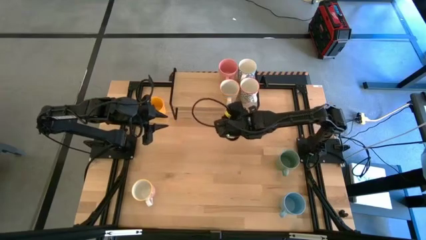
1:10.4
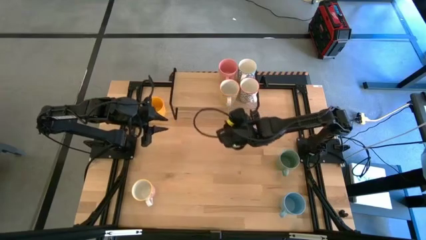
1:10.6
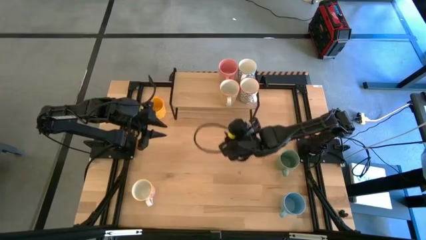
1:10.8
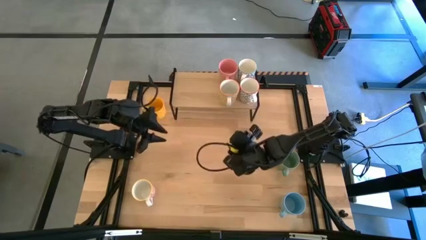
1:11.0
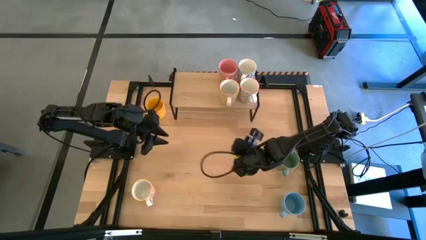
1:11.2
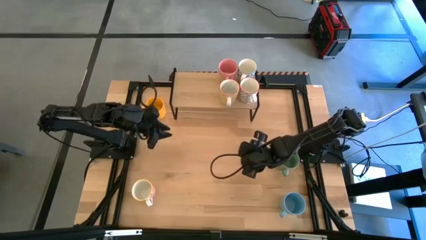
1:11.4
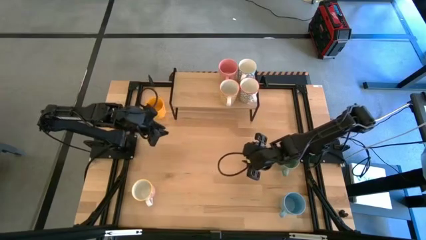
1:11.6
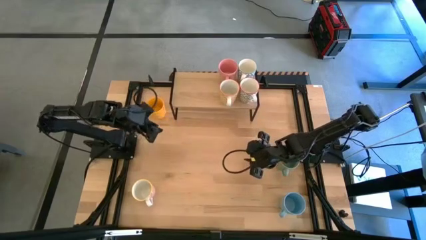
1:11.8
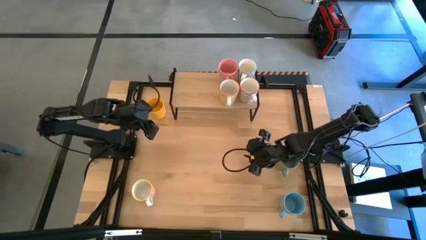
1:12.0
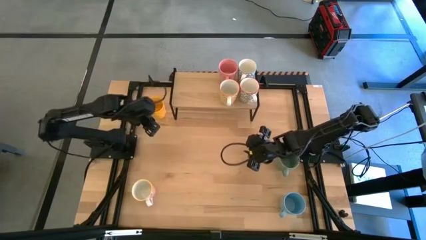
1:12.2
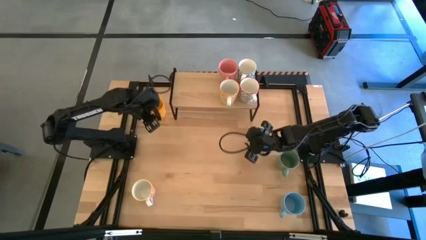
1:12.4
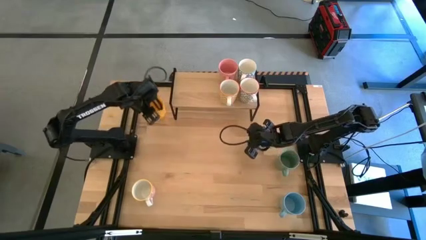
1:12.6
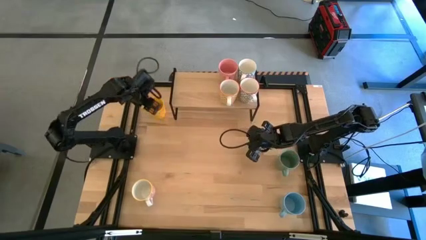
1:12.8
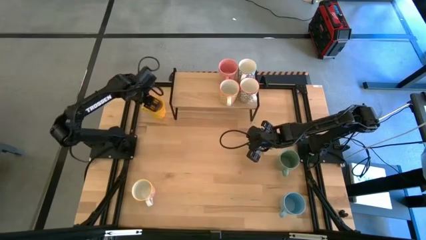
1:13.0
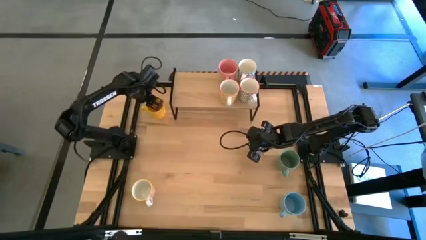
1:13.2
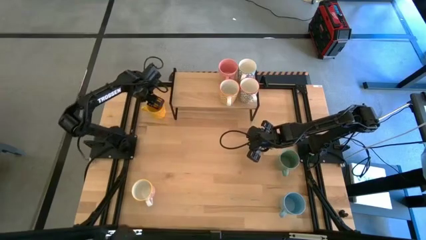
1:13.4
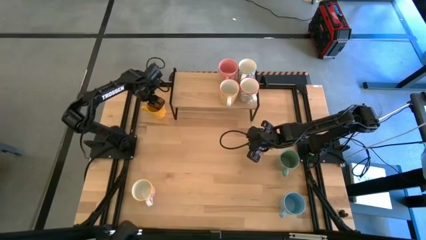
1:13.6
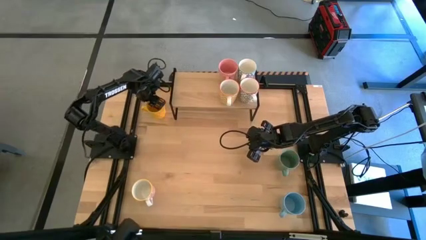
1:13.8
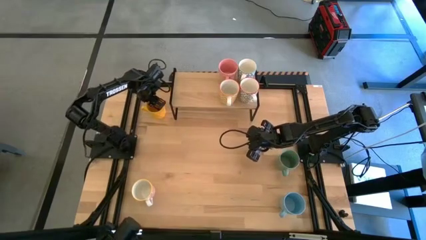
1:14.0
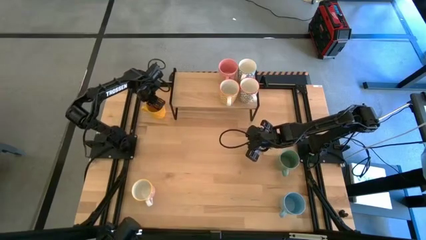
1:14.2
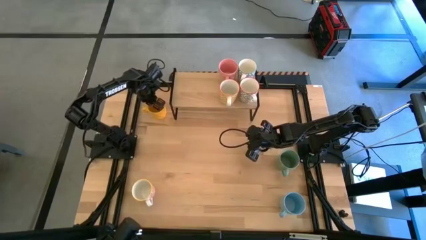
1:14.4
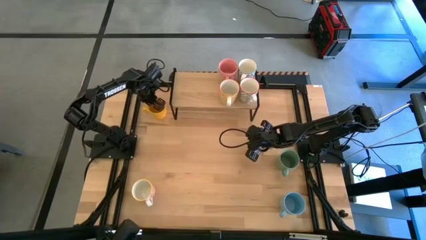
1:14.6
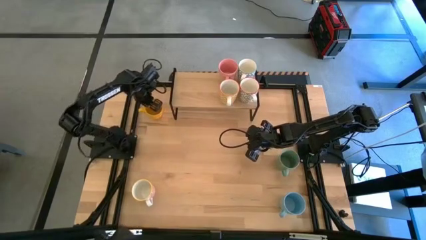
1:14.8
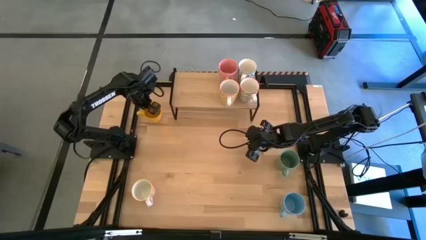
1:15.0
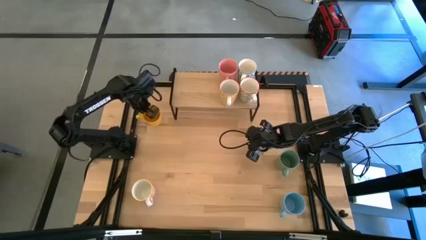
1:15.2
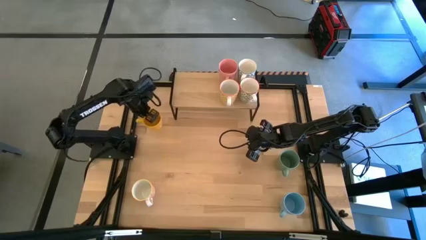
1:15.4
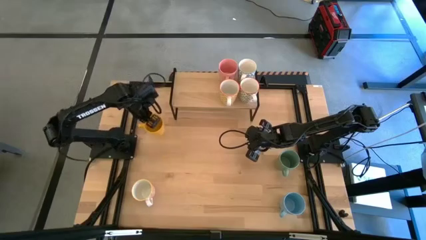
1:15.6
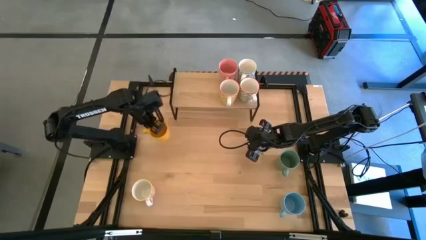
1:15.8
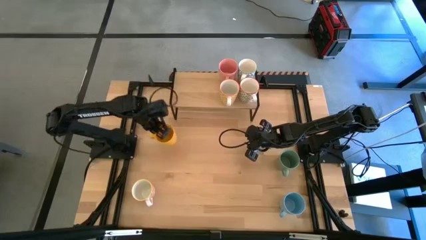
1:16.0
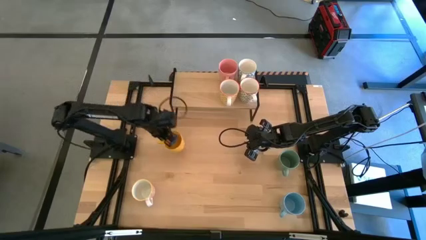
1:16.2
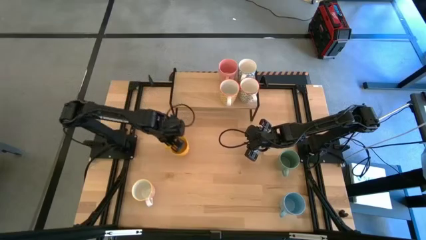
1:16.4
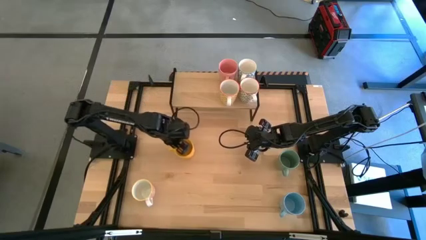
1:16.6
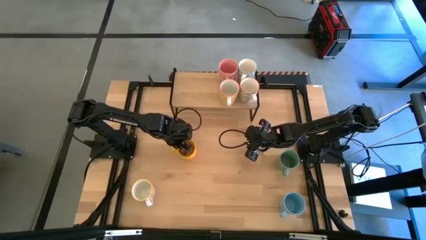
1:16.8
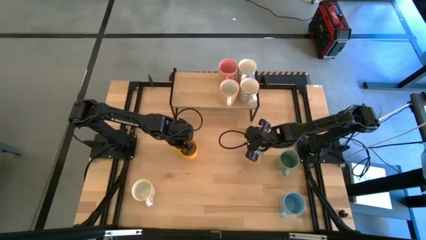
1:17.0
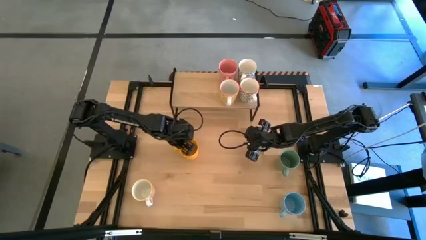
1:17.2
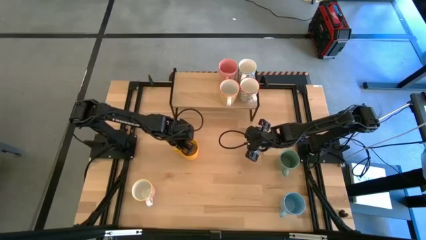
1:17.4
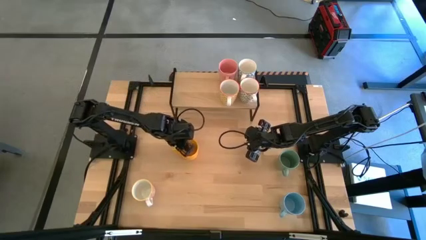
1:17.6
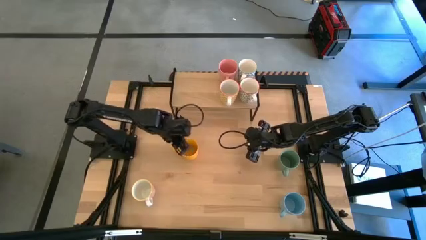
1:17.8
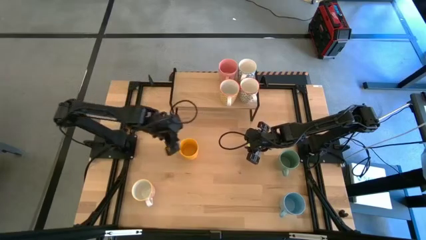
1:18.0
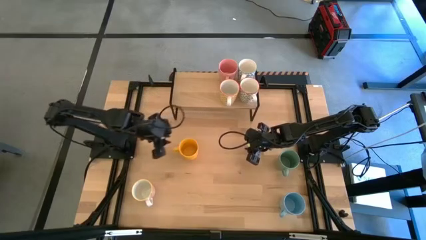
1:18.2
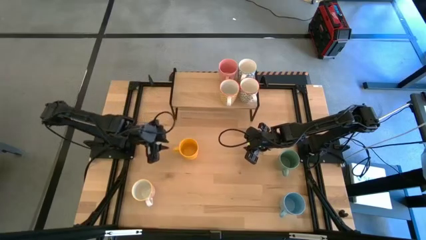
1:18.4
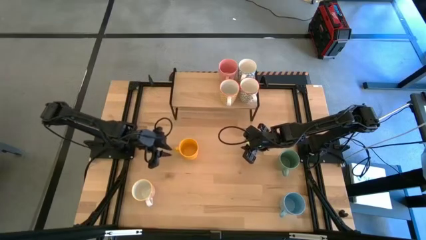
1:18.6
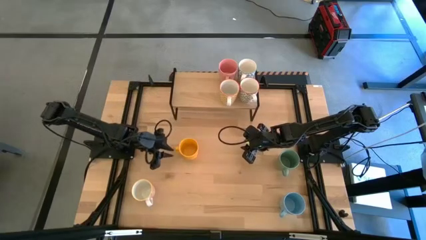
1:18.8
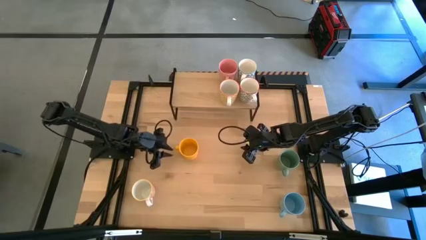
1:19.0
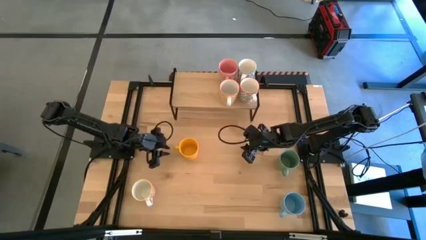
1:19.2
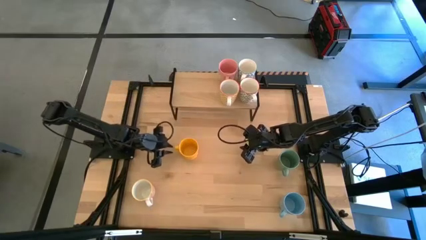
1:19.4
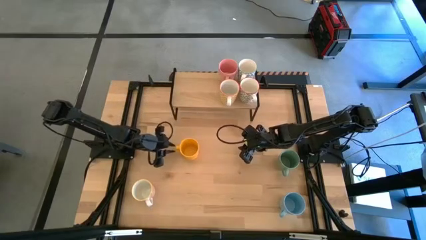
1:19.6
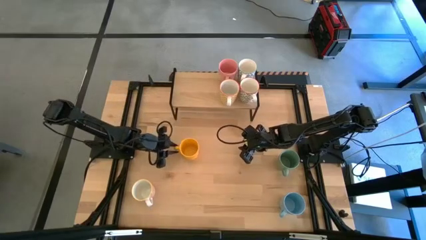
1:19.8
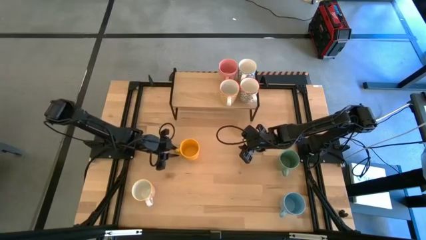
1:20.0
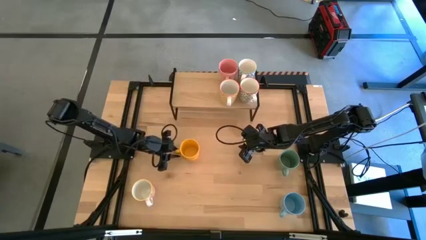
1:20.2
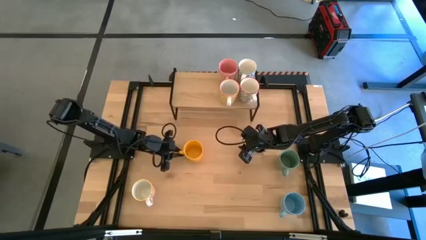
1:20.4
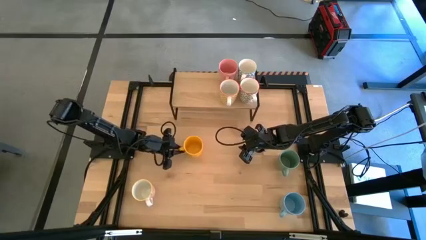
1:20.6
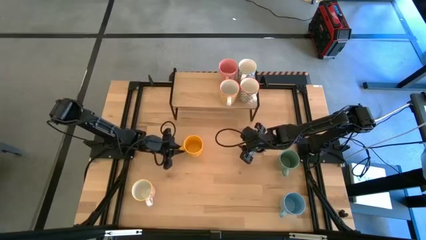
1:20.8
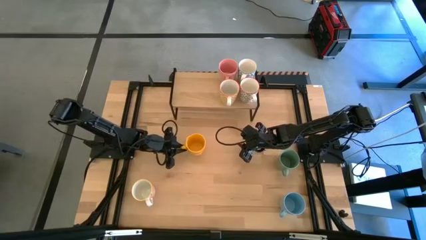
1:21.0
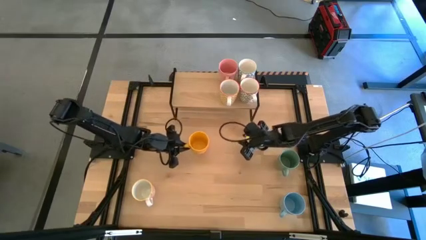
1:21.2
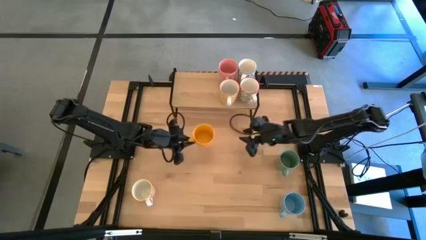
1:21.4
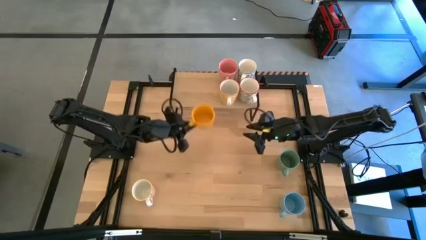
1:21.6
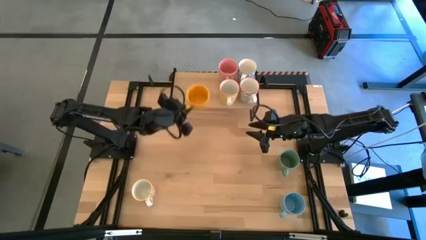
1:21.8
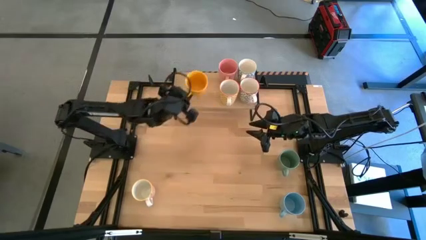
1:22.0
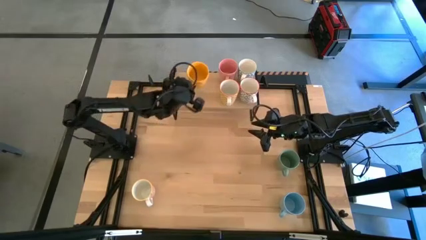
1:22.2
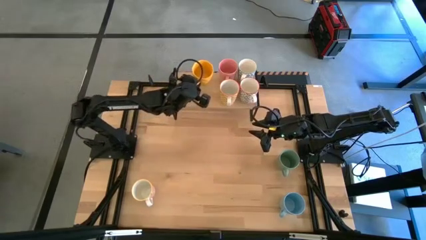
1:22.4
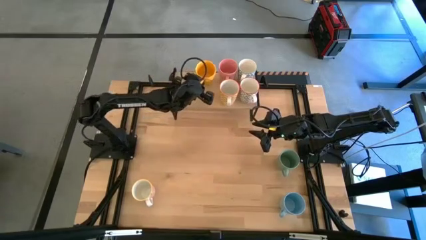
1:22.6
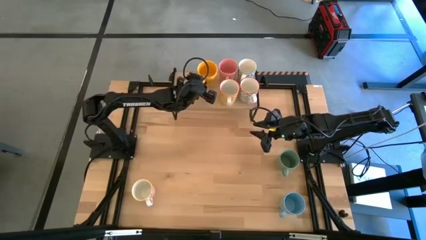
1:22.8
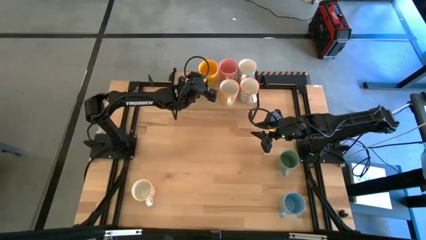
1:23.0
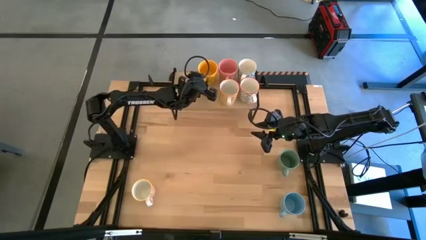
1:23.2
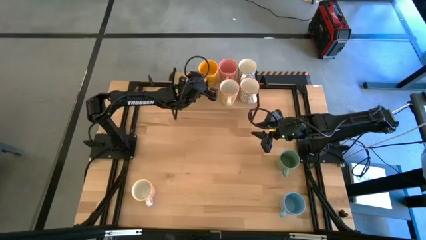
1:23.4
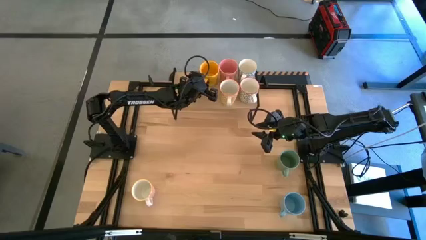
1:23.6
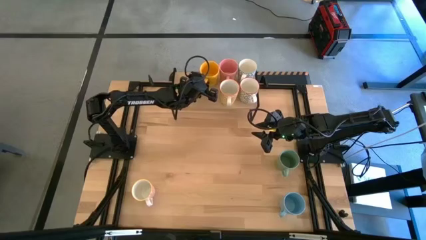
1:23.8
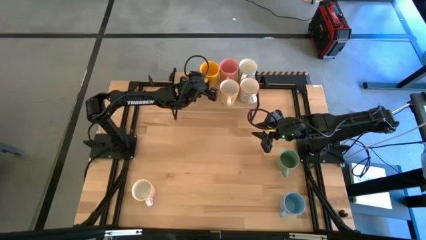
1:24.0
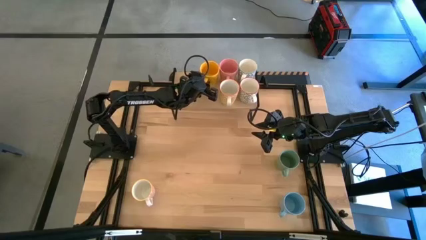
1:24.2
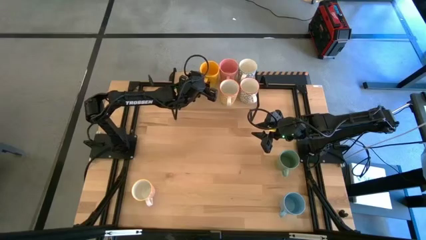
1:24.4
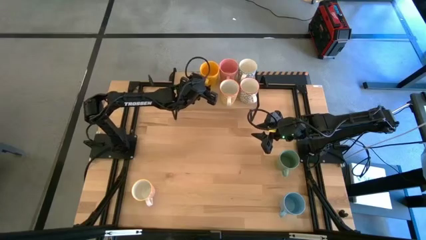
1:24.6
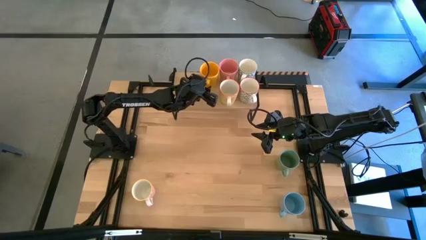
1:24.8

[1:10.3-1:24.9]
Task: Place coffee mugs
Put the yellow mug on the shelf
